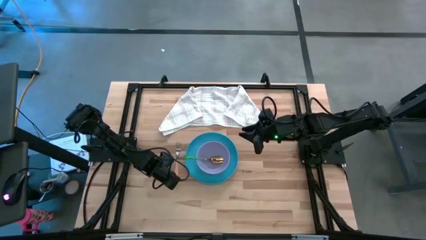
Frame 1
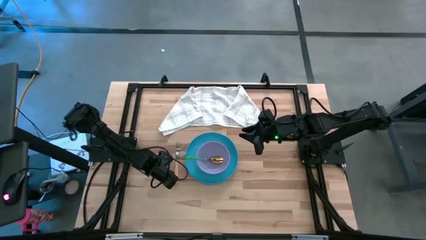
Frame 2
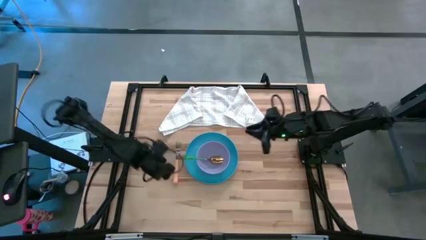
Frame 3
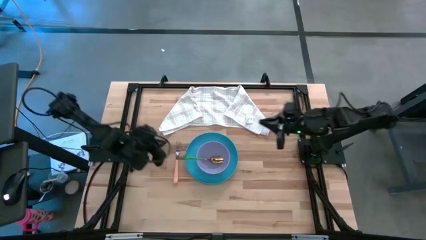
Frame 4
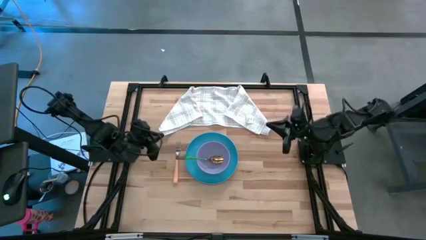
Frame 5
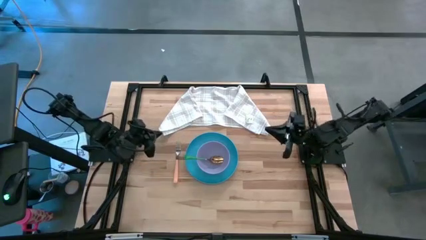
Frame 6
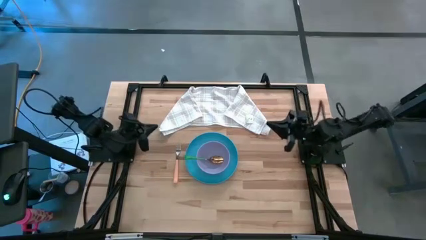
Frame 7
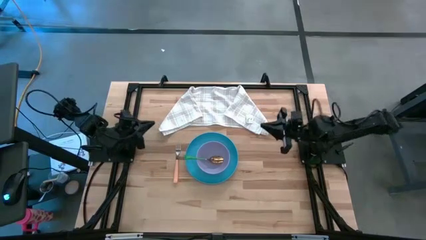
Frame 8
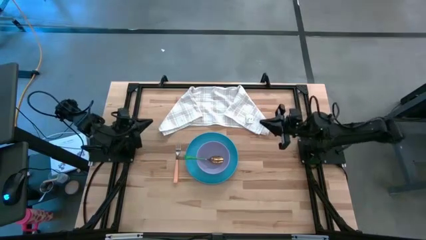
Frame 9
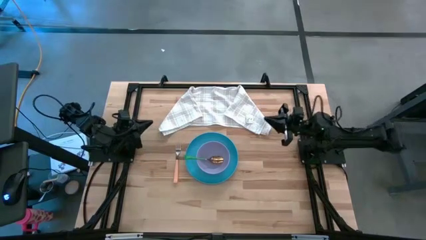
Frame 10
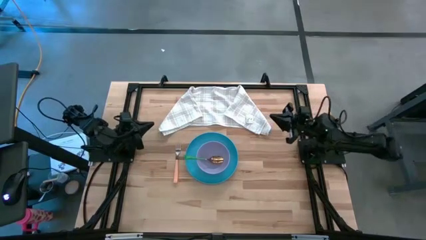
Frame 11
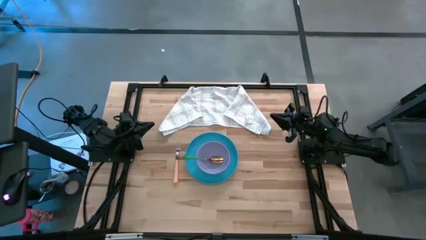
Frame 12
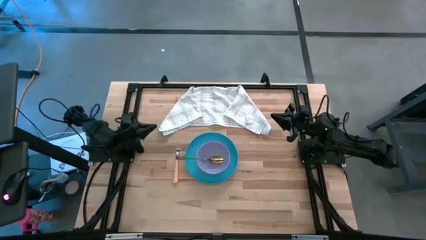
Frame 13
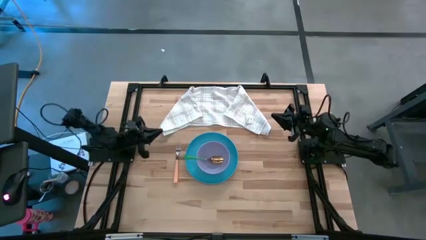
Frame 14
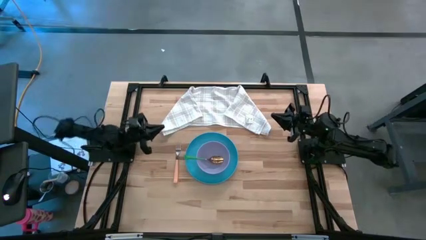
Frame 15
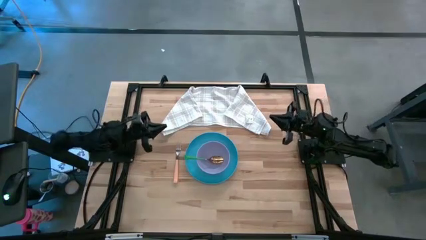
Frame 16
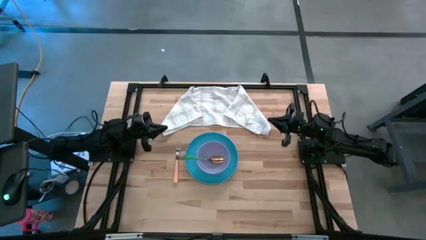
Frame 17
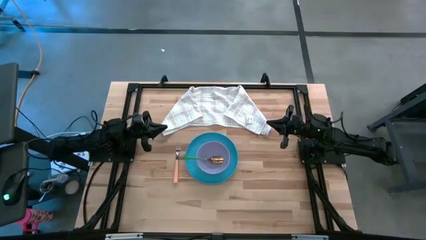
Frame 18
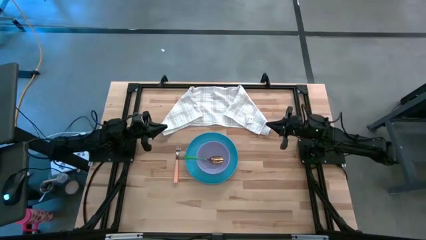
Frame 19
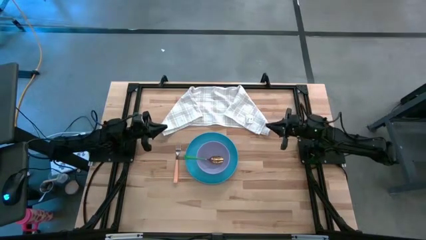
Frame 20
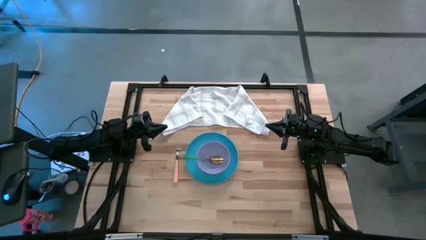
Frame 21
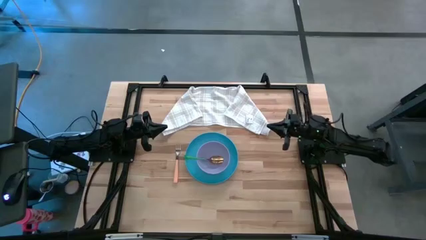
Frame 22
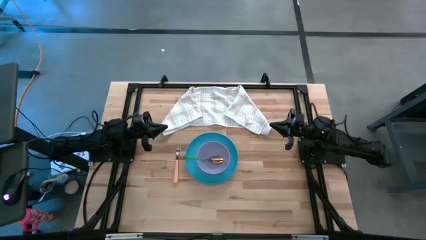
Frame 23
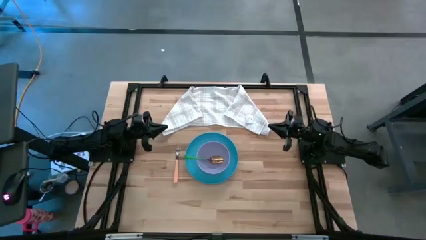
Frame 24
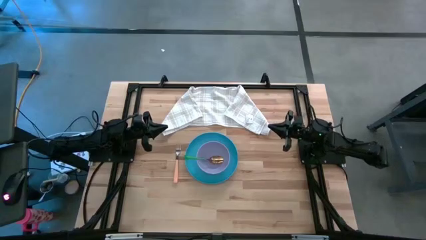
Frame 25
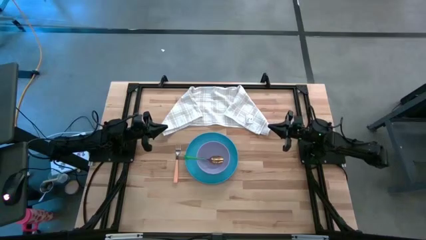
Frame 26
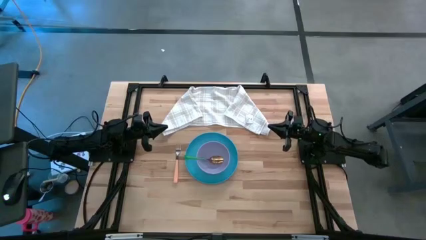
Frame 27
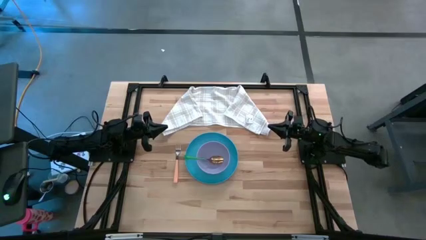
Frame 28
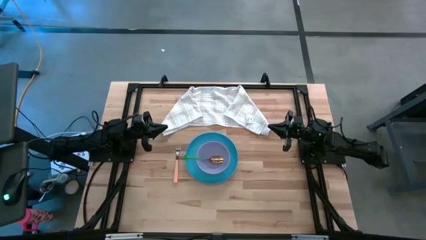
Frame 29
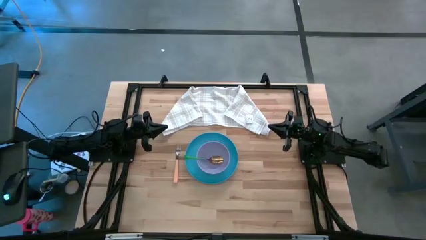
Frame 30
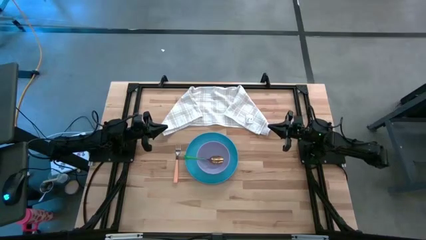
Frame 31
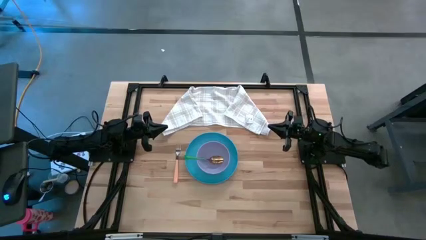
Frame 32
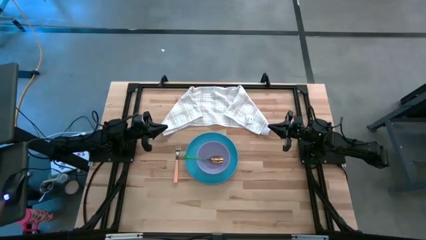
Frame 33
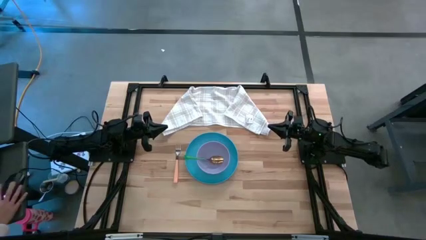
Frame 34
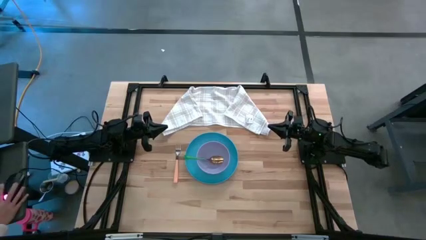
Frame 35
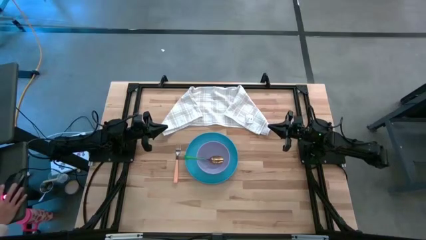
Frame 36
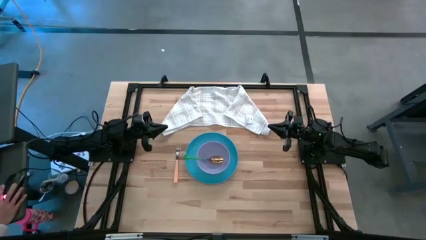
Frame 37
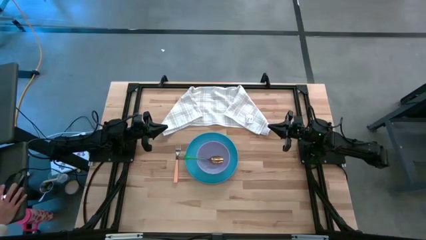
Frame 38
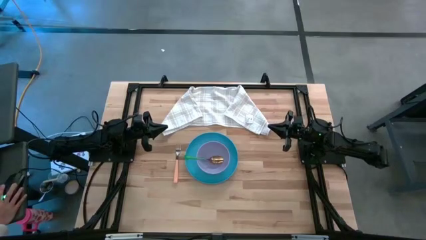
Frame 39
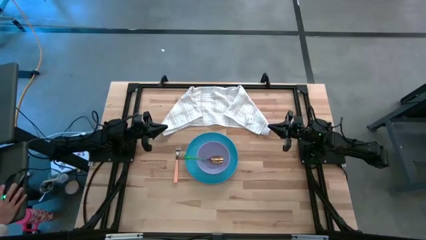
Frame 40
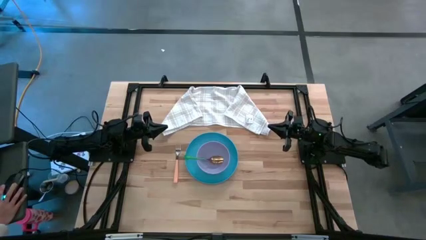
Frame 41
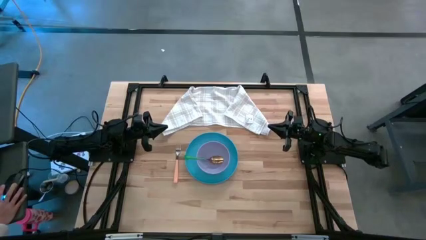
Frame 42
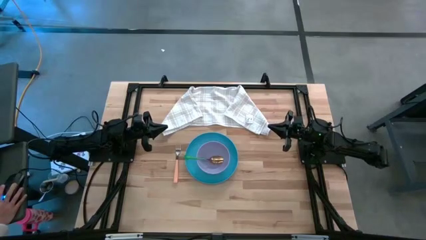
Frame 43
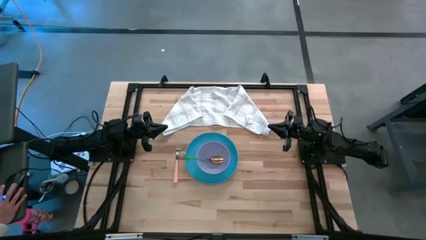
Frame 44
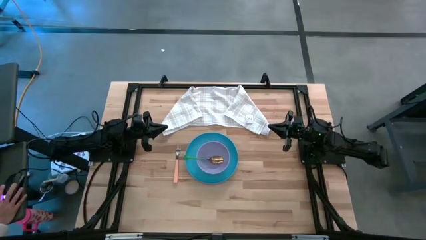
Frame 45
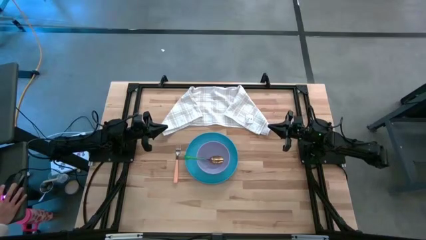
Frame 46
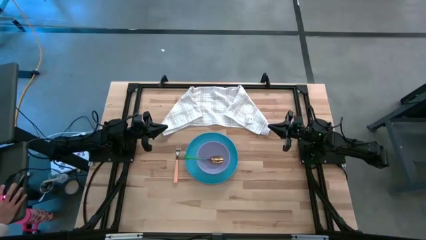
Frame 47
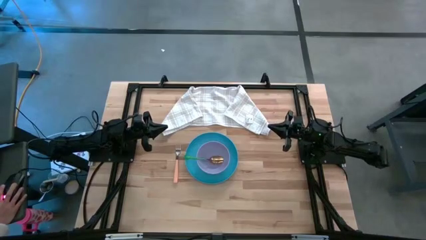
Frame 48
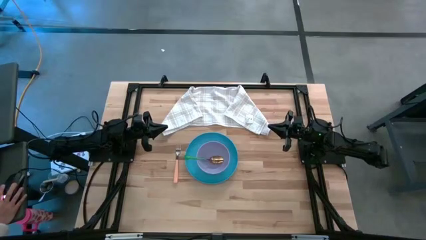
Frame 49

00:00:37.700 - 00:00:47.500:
Task: Set table place
Return to Home Position
